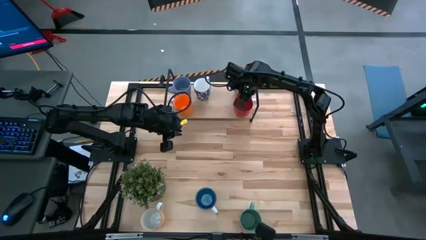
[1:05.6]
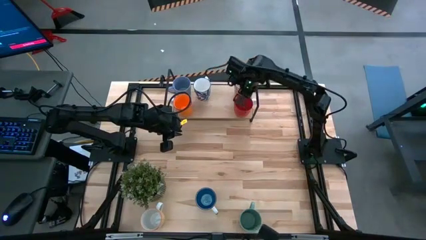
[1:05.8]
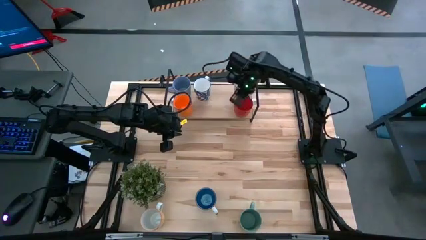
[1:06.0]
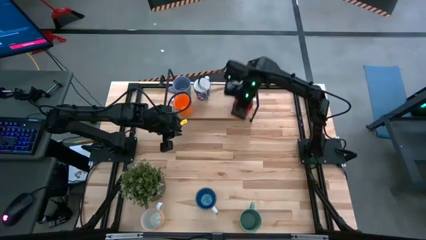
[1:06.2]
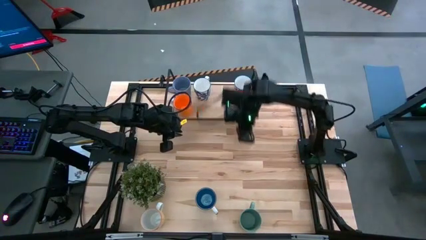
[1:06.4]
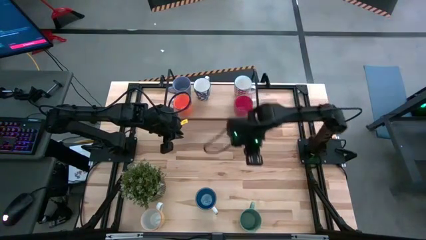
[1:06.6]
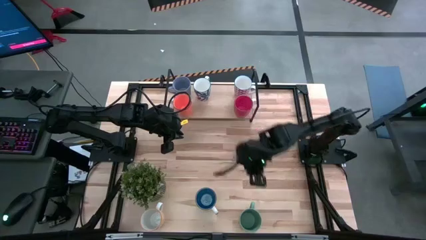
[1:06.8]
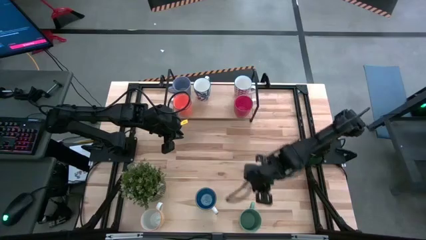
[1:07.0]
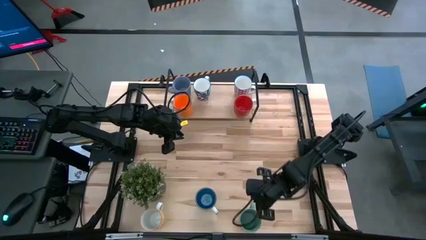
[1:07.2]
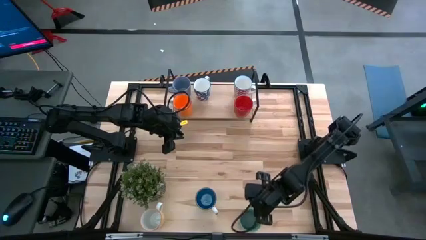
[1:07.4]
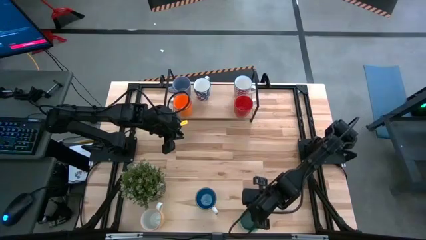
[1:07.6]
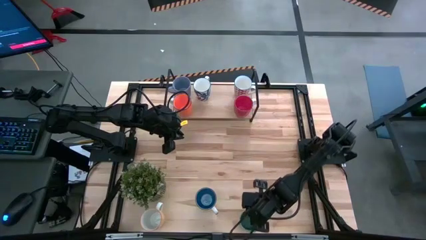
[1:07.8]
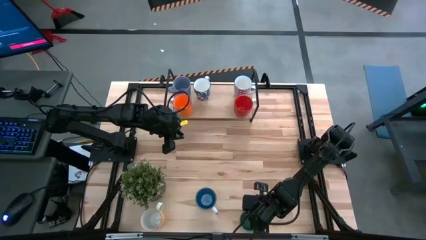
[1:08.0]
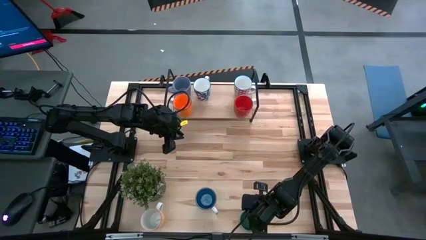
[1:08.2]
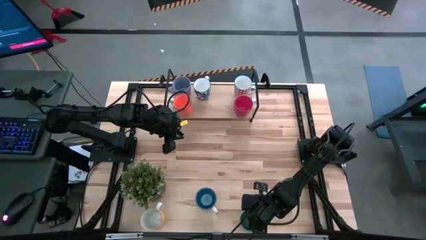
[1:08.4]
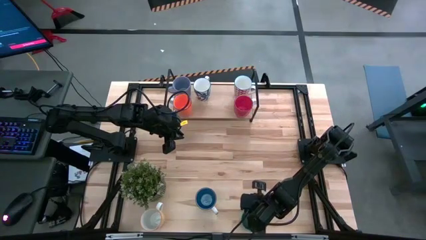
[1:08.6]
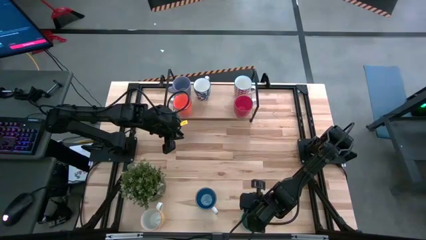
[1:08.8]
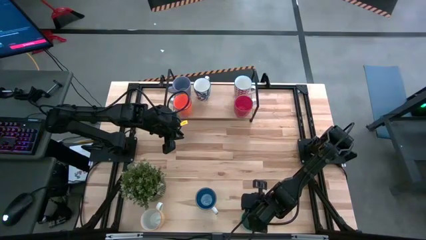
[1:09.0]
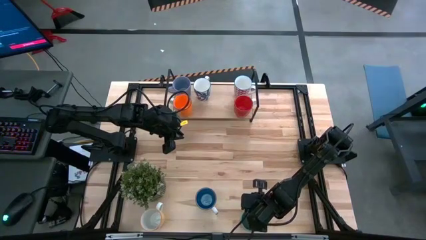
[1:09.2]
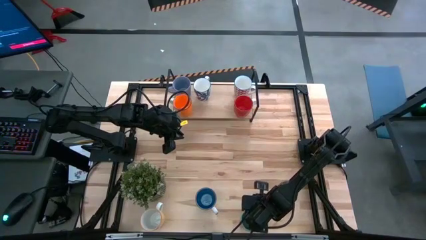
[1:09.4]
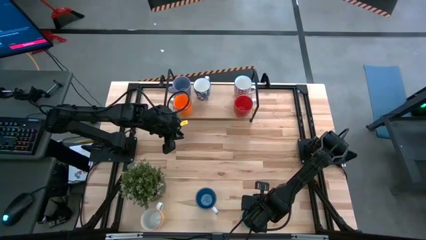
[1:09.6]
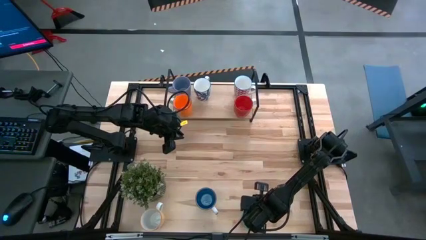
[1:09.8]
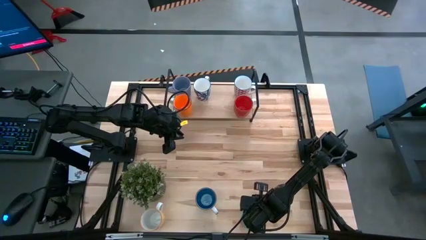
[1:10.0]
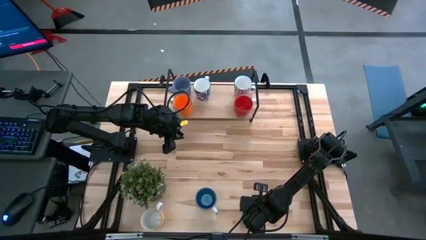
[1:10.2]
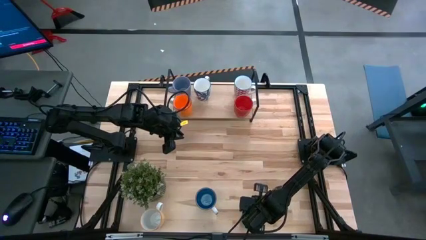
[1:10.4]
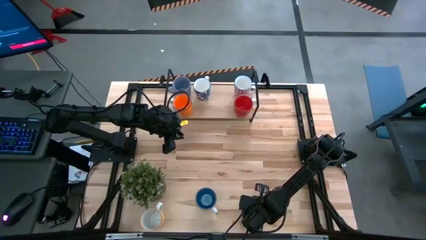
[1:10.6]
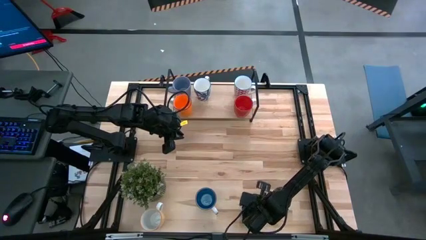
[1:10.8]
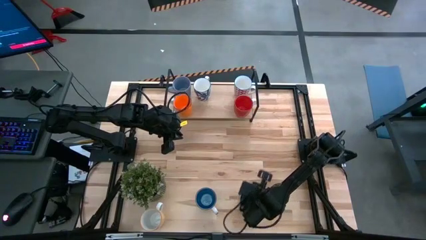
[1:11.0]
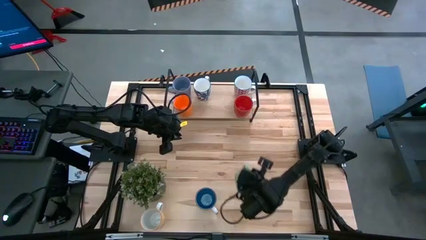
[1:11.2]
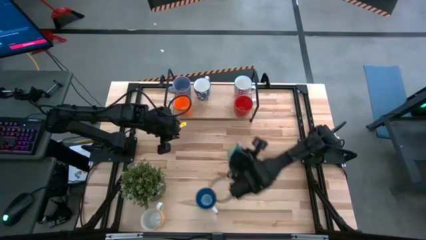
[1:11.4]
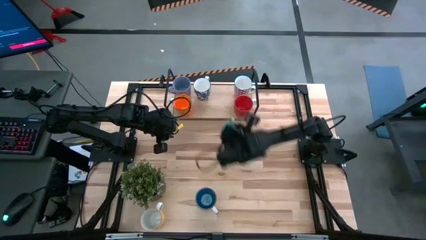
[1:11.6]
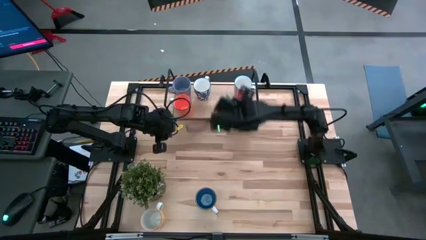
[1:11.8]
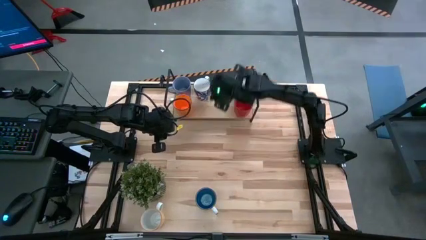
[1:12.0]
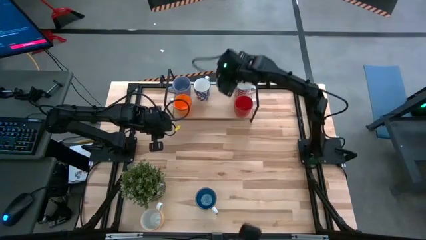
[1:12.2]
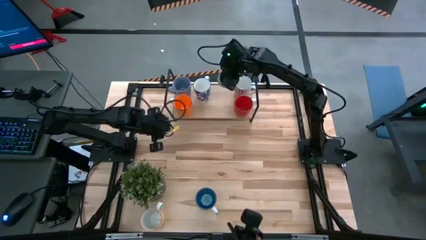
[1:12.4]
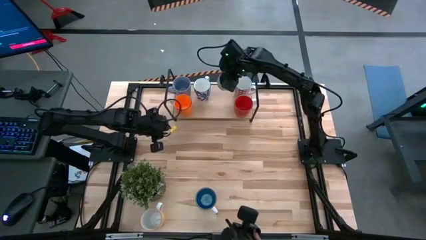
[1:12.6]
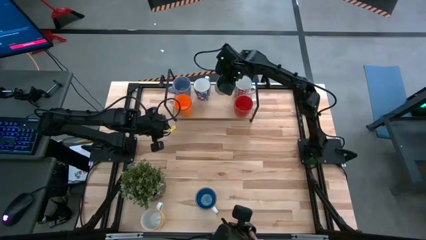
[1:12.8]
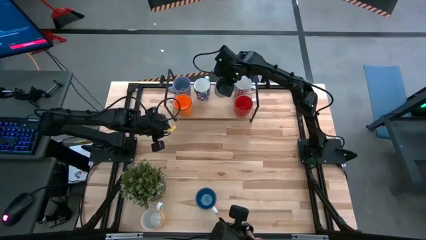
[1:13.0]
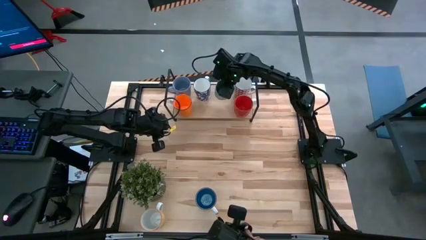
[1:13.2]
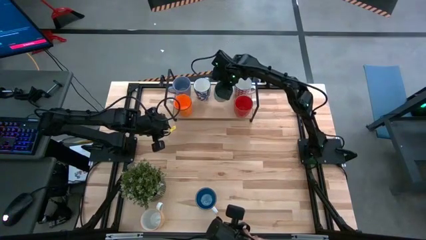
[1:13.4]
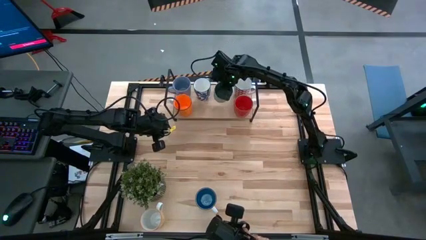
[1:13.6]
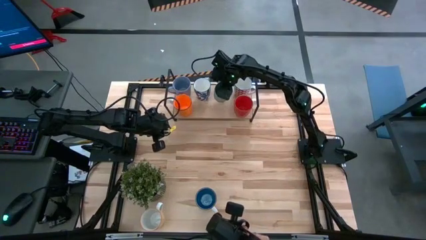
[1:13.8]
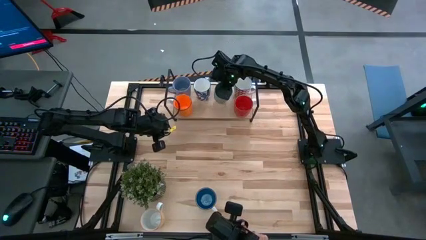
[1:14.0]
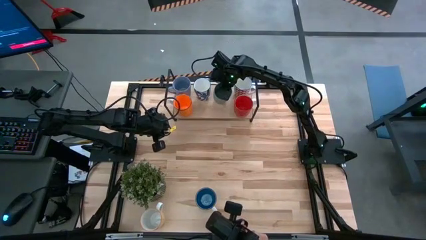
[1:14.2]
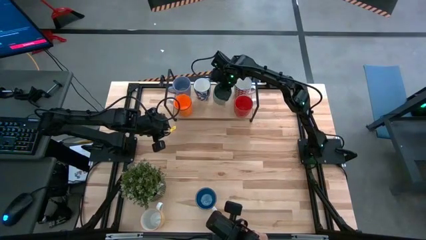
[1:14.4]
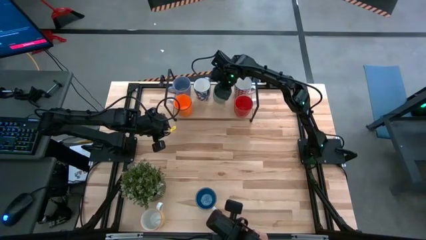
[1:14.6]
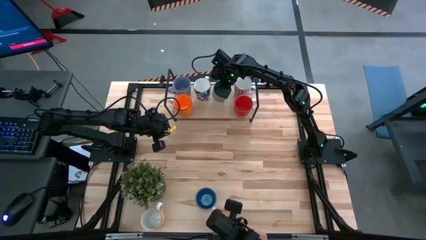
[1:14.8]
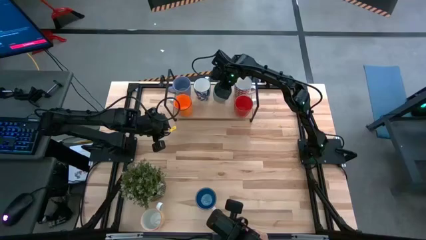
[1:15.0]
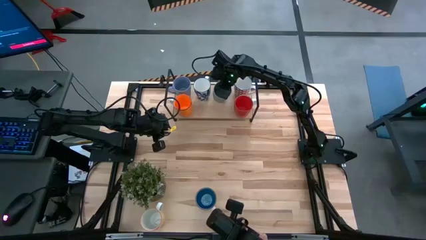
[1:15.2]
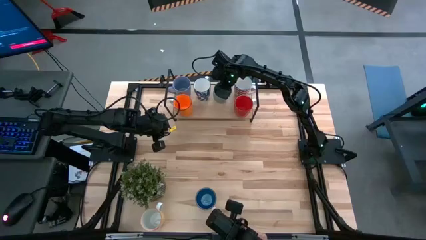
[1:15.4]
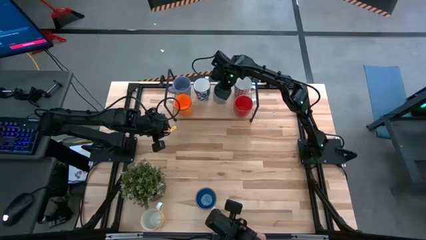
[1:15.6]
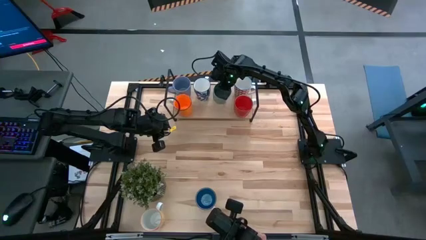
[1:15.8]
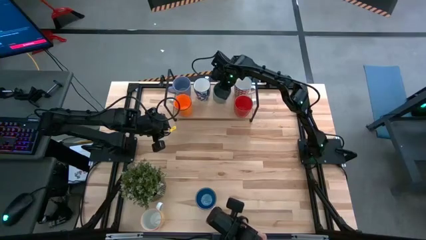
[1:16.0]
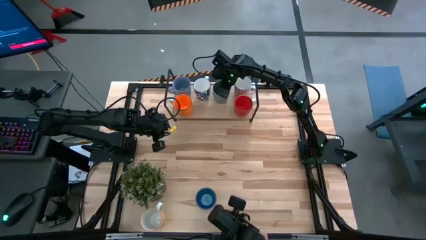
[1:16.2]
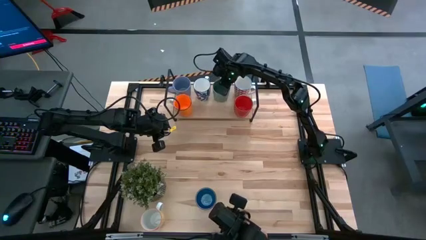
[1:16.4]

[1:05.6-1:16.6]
Task: Place coffee mugs
Put the light green mug on the shelf

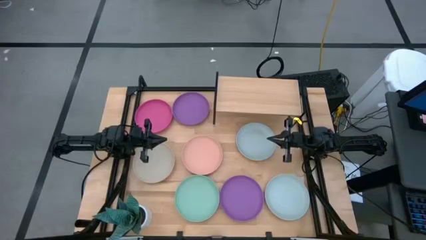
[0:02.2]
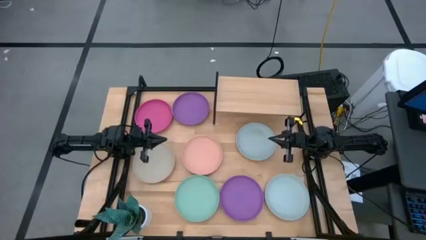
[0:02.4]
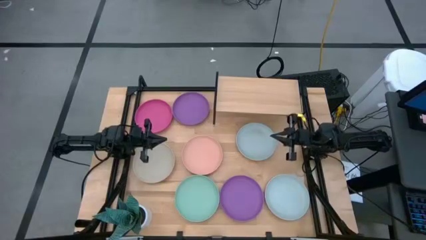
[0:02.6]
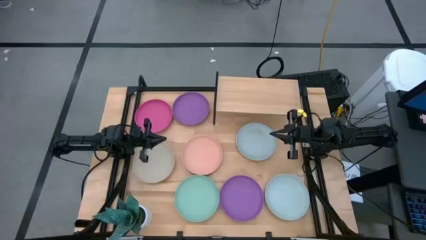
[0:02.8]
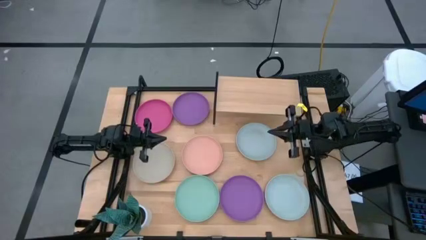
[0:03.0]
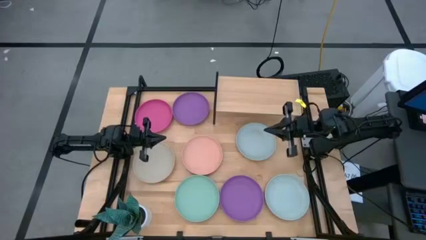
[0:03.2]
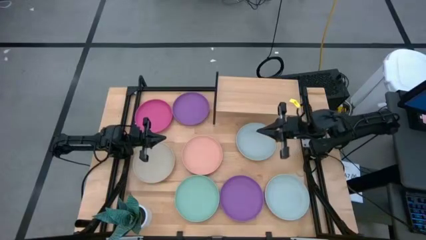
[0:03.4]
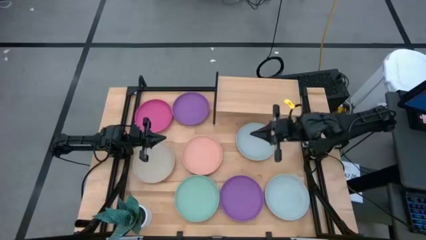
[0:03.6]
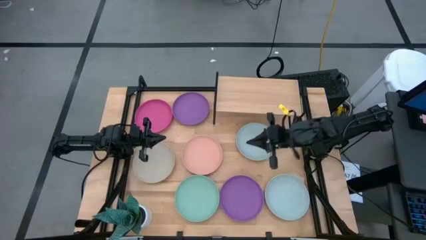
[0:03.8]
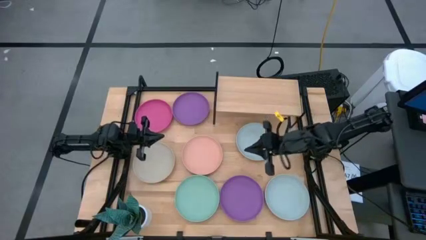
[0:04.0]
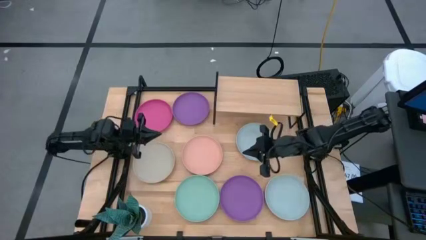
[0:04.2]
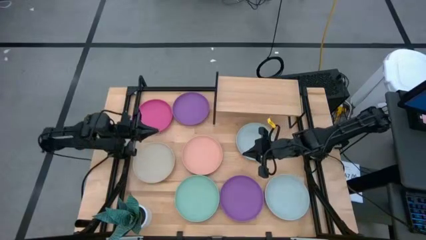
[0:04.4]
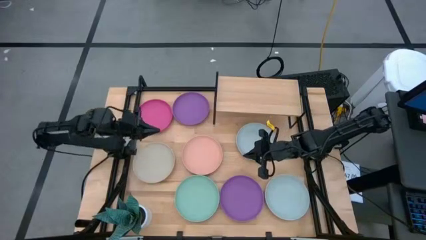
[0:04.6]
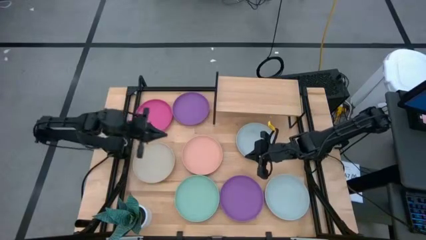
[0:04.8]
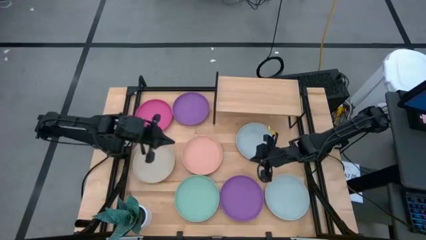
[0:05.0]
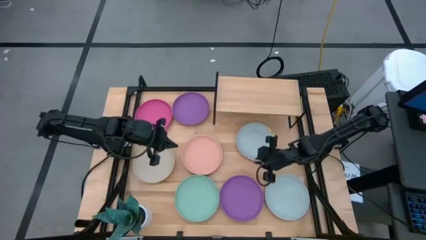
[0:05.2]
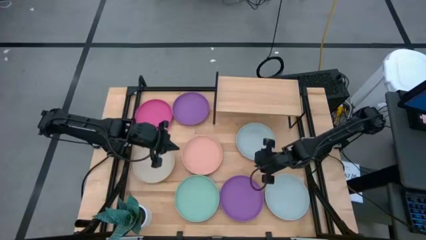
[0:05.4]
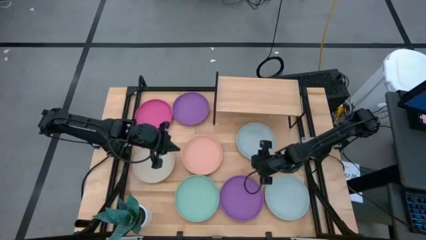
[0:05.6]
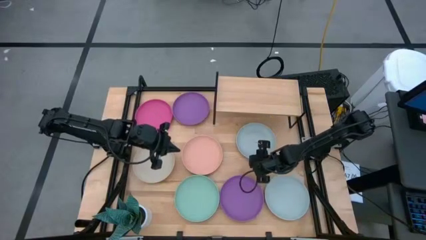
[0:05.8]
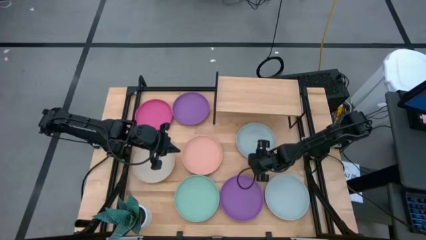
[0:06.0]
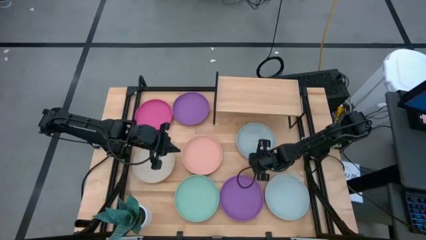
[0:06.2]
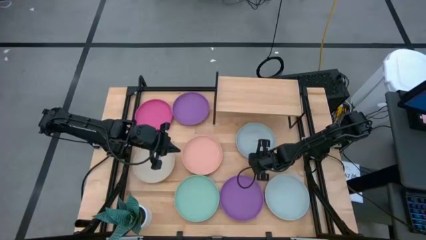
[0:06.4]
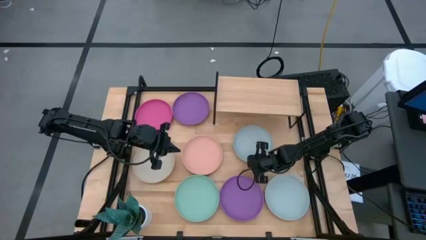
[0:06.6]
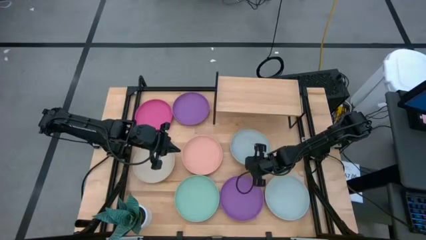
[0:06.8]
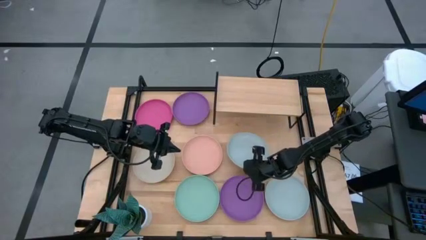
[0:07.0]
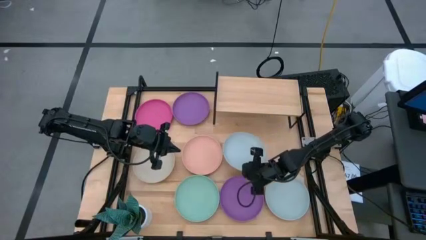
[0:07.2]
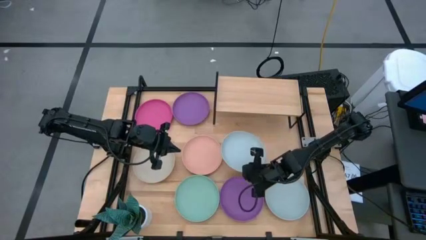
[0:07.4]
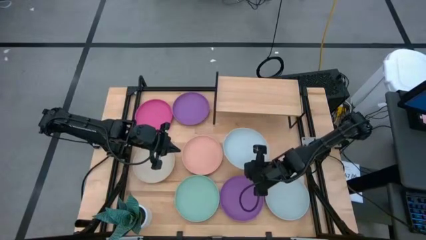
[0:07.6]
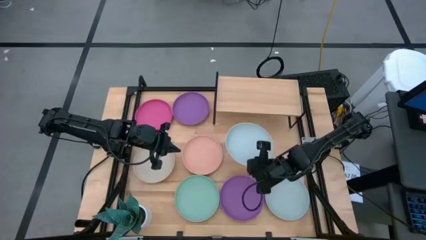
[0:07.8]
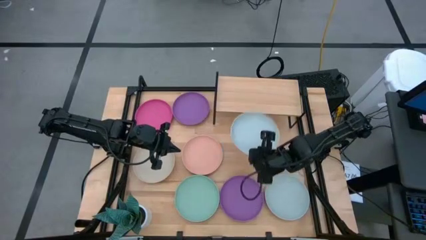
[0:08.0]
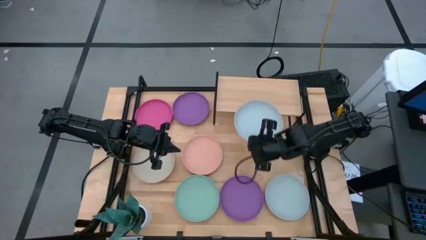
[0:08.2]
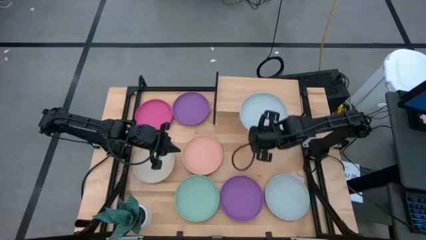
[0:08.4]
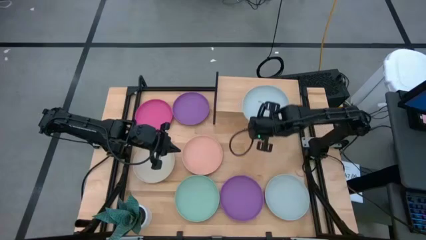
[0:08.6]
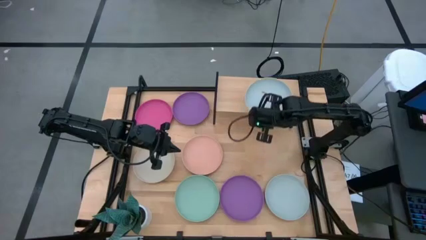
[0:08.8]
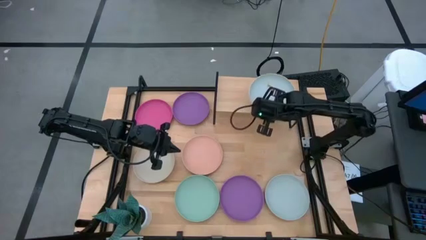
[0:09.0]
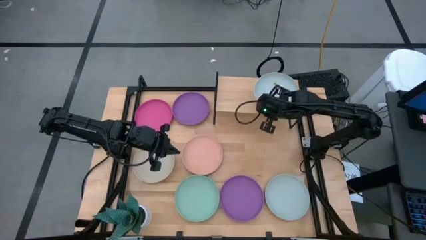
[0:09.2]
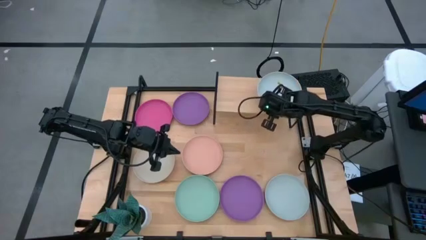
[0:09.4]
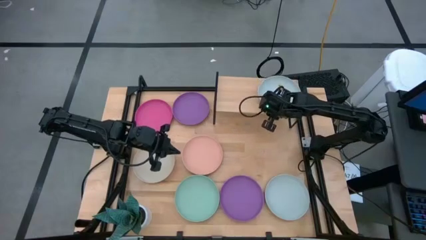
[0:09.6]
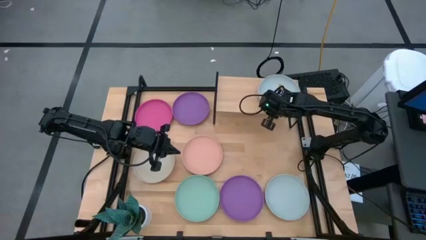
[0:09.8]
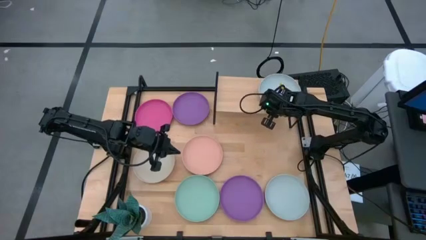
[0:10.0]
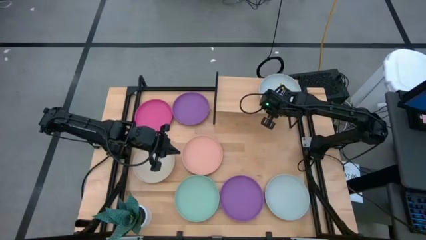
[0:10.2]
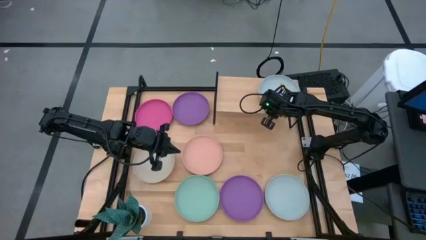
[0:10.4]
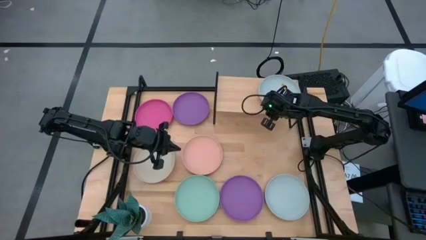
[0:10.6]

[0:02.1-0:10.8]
Task: Place and stack plates onto a shelf
Put the top light blue plate on the shelf
